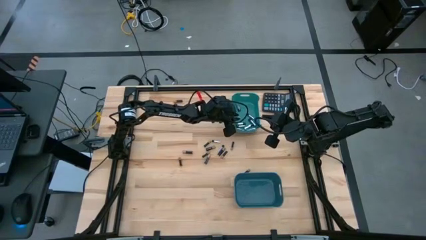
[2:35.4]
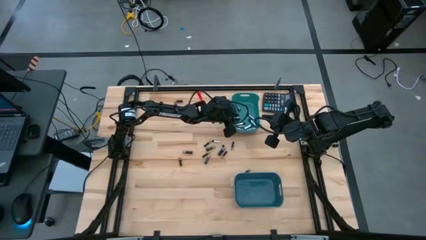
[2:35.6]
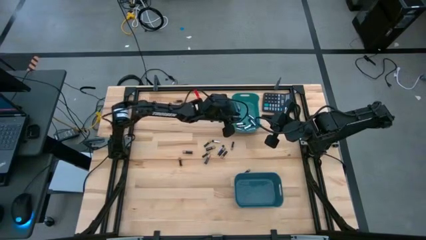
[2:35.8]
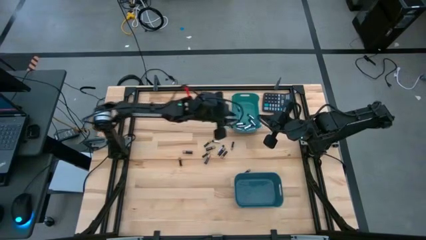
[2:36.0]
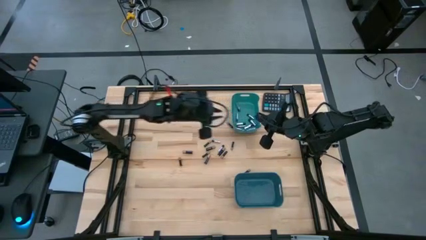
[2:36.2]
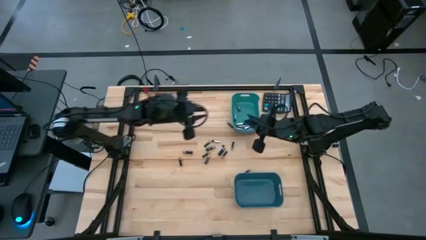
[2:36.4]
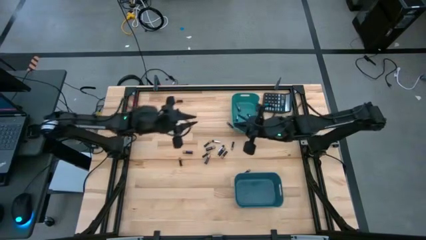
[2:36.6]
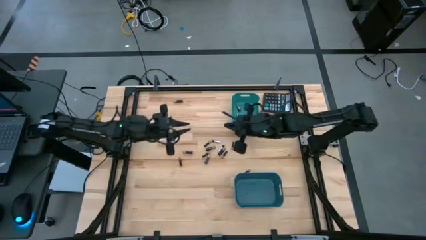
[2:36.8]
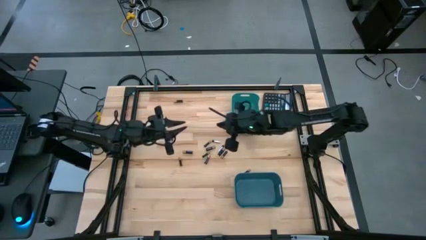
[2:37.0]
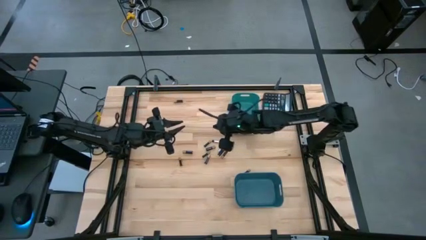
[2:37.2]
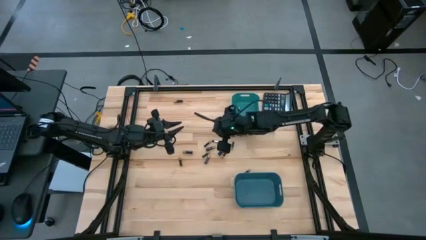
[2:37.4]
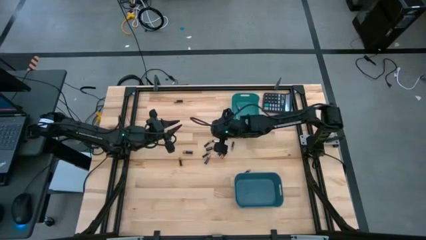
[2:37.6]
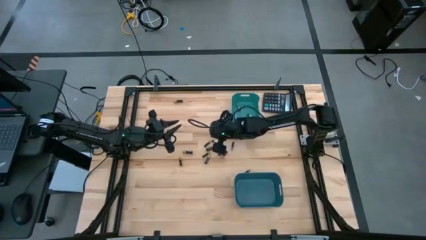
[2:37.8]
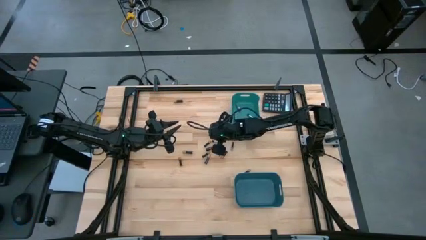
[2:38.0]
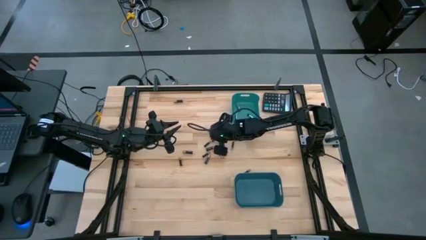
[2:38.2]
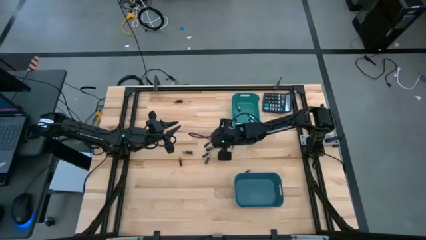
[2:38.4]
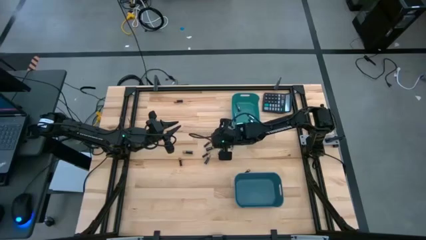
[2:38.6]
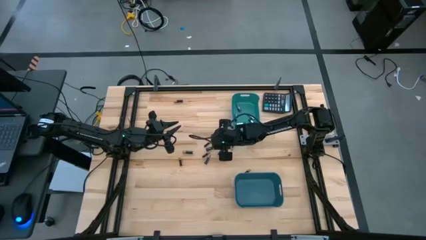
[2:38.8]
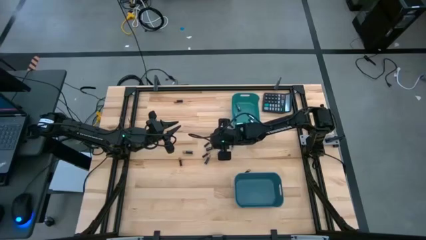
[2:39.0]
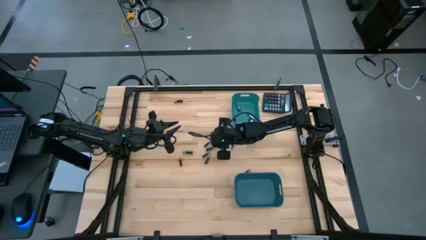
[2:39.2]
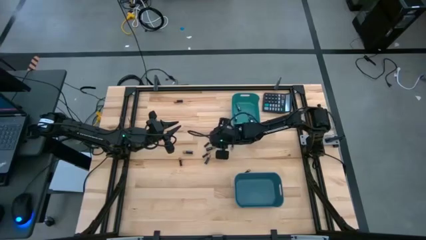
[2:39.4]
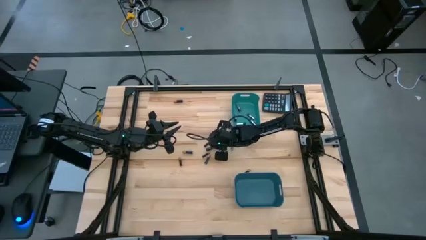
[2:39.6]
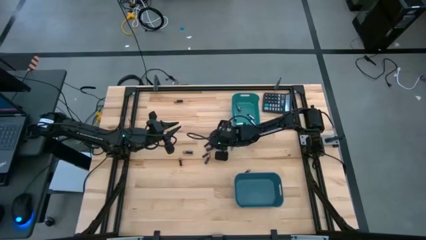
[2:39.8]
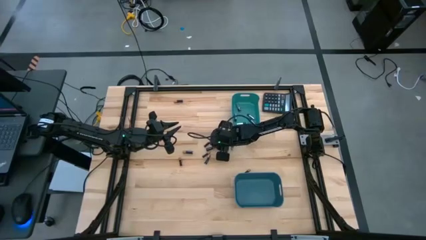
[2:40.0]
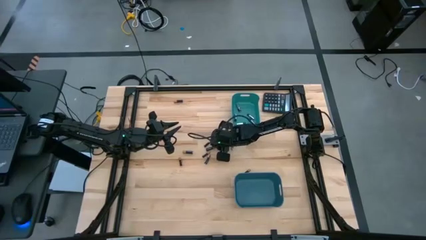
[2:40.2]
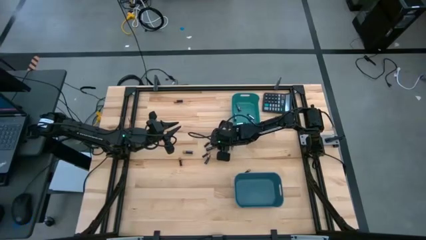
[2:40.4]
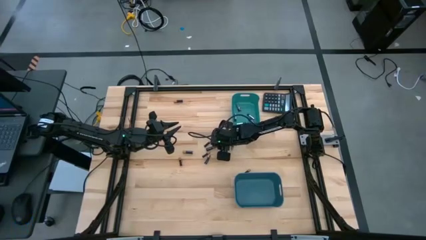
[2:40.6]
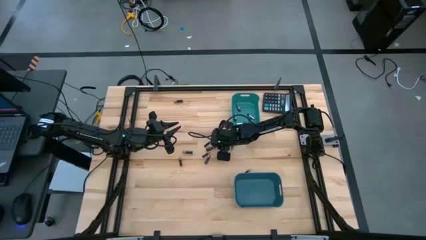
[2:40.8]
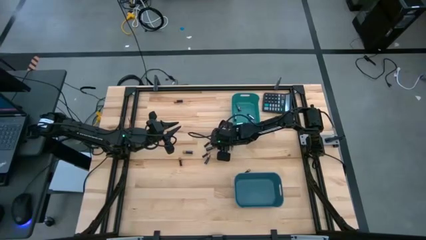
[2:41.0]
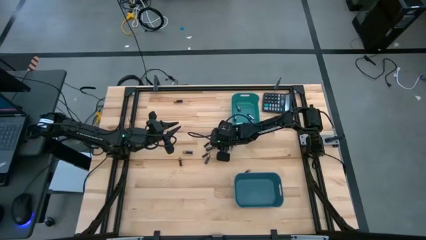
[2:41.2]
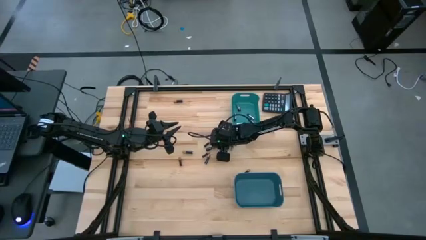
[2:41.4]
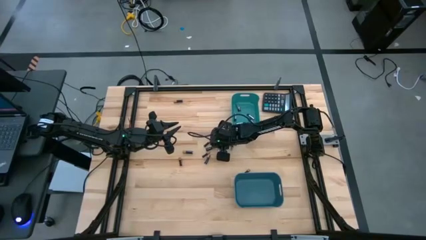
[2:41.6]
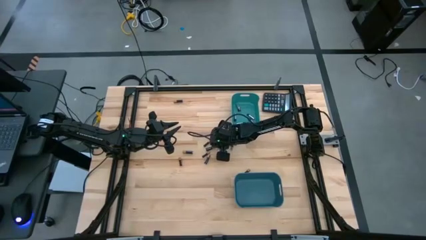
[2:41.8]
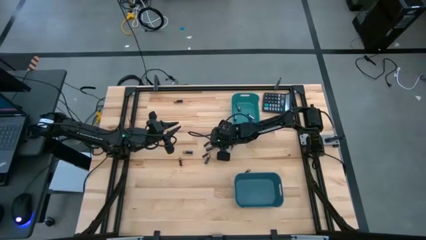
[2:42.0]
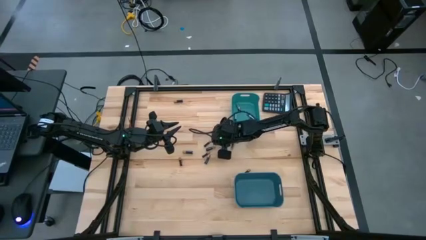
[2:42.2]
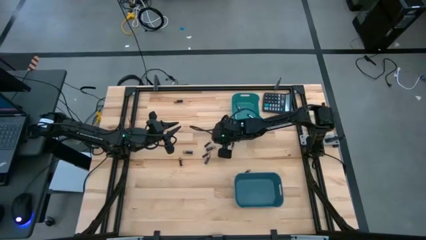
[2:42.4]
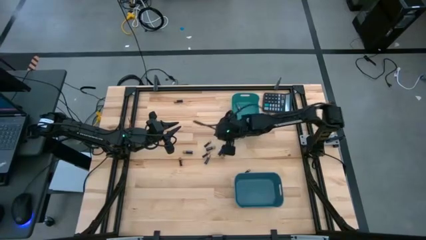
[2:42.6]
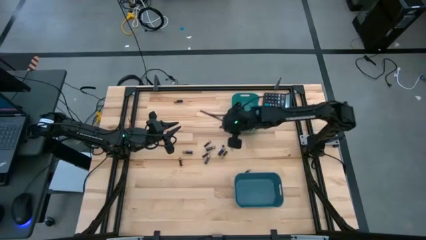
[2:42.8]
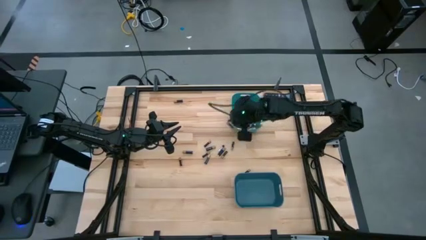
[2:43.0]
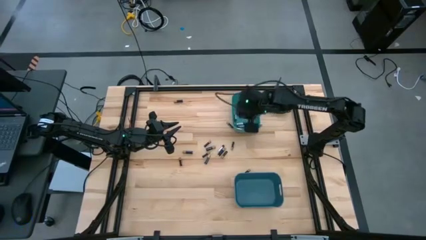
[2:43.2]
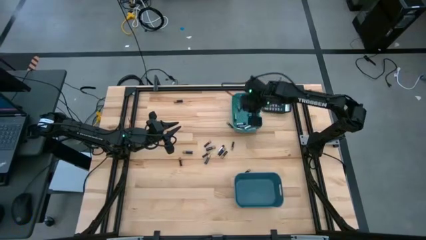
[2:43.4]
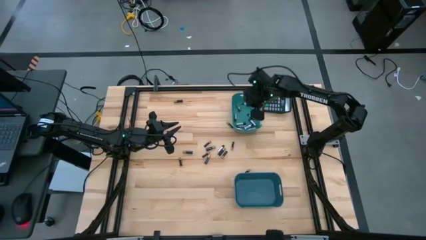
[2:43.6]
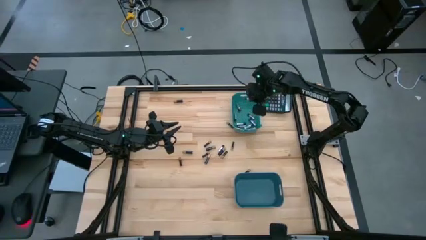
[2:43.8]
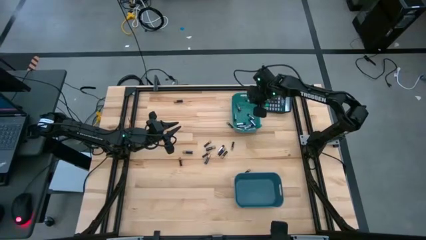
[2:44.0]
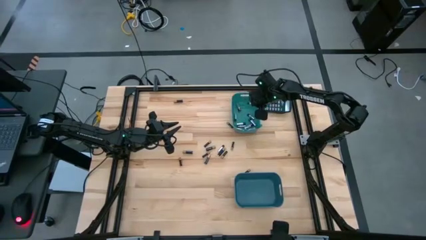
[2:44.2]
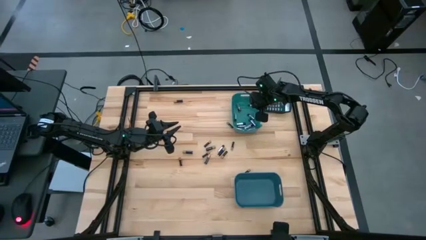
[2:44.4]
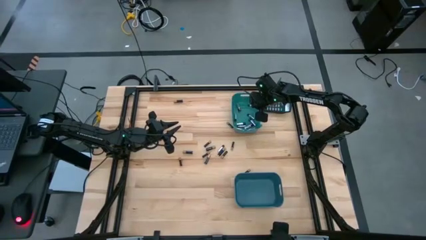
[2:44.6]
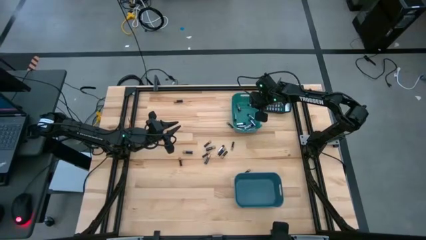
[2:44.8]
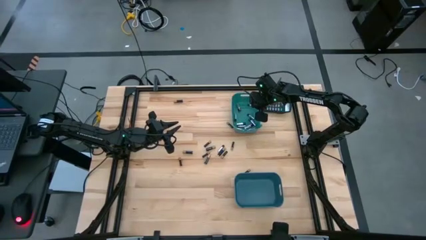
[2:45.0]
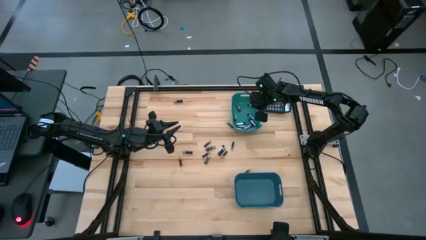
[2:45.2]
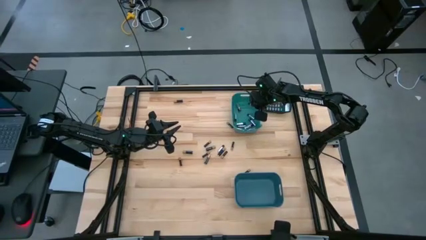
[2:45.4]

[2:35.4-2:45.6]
Task: Sort batteries
Put the silver battery into the green bin

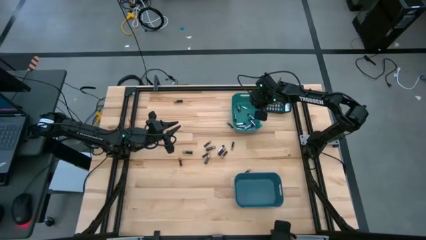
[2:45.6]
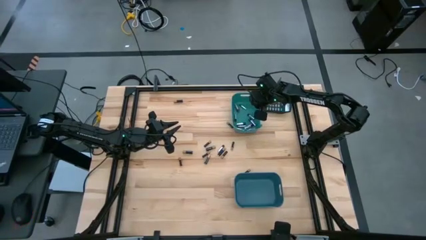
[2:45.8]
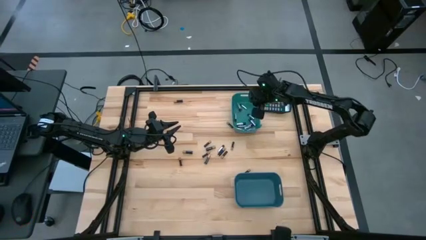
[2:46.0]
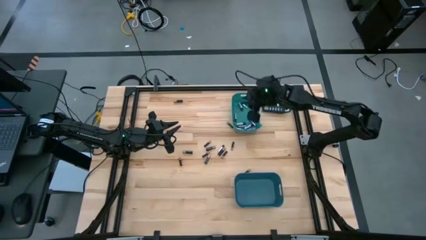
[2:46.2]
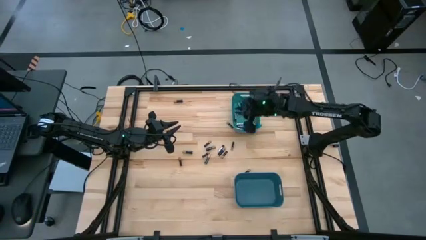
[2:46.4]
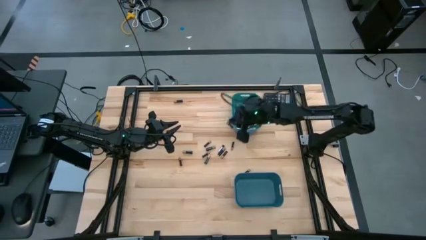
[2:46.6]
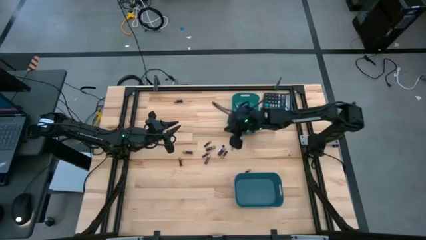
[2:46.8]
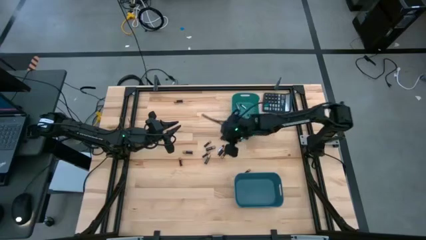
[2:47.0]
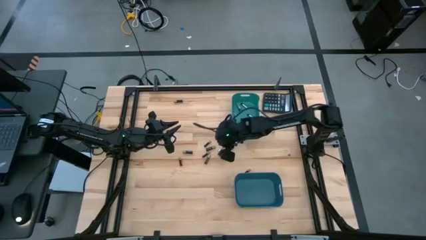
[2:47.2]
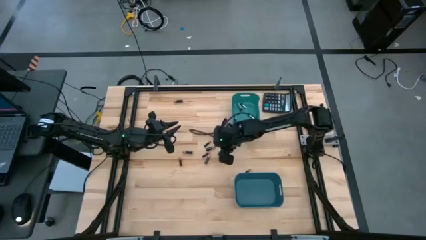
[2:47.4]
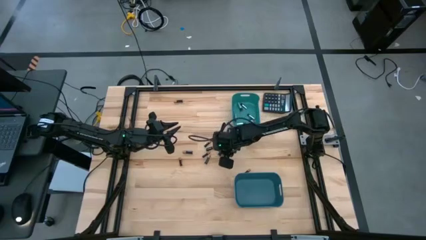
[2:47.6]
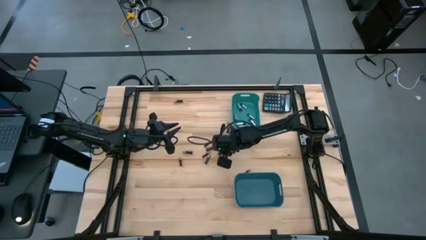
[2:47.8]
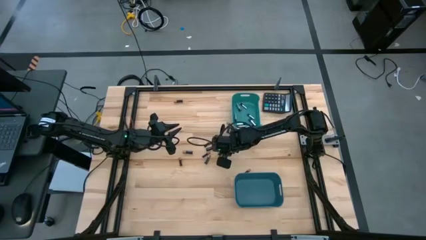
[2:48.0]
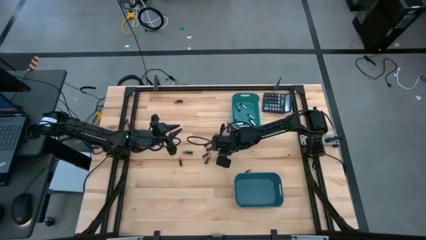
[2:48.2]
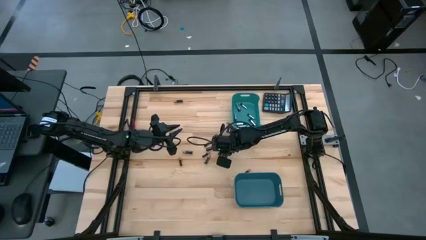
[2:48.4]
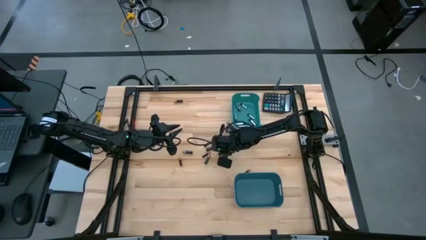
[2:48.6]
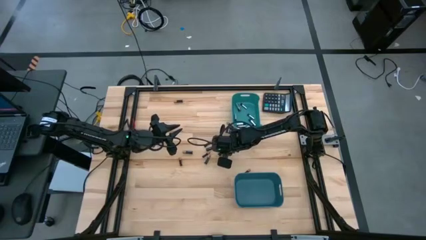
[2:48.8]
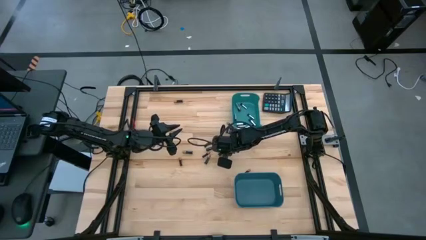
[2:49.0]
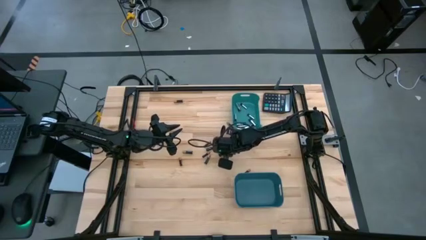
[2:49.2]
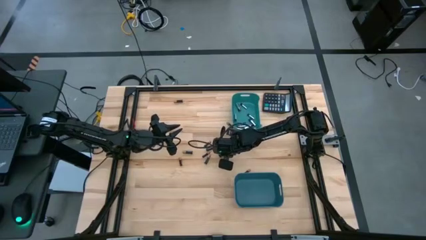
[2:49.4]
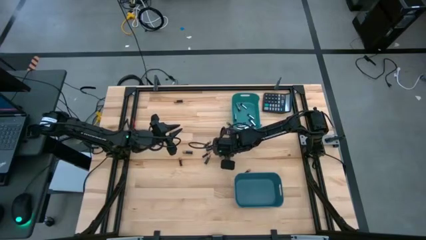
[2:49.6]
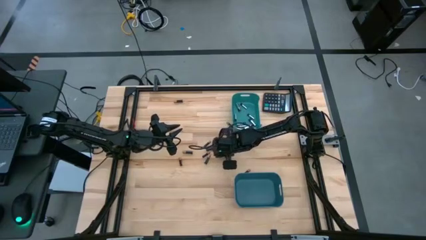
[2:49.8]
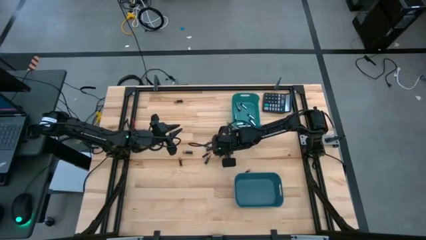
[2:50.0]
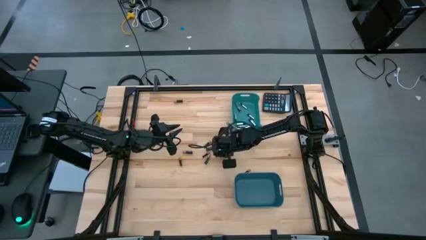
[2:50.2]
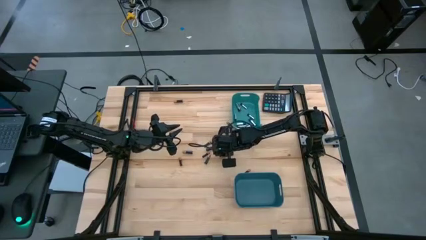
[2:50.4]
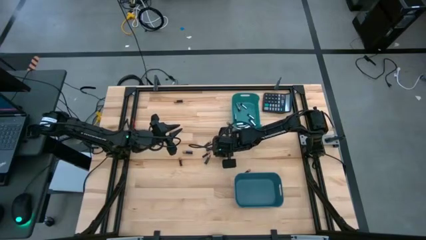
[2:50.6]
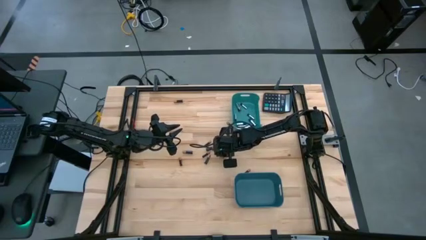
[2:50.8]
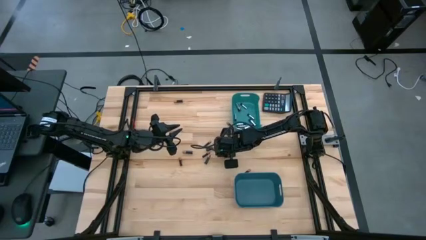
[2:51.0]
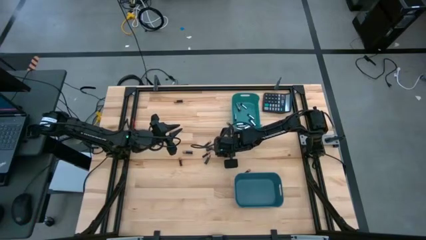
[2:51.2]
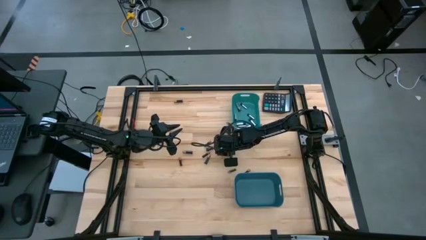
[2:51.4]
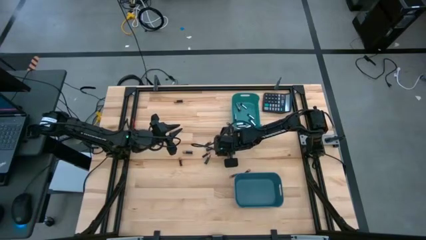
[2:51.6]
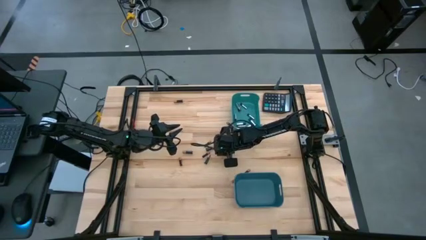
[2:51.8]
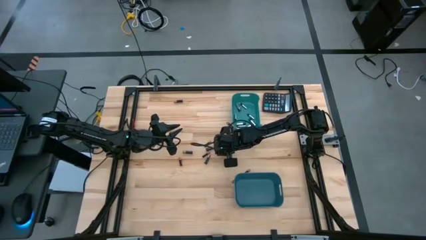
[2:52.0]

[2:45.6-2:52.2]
Put the silver battery into the green bin
